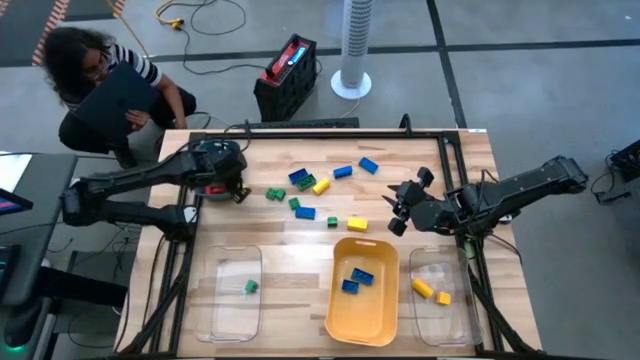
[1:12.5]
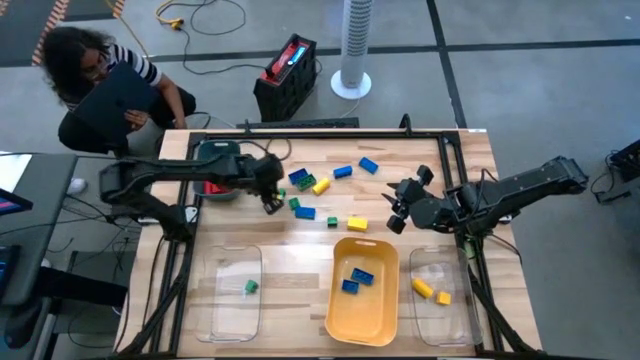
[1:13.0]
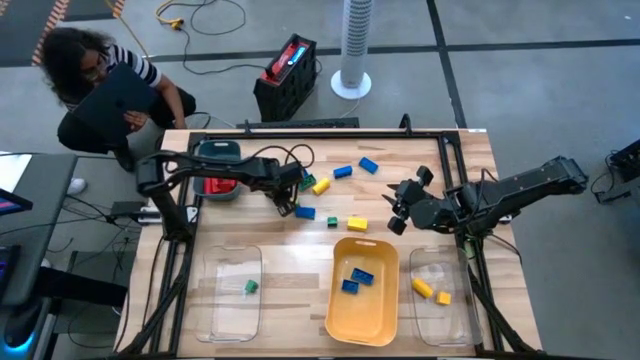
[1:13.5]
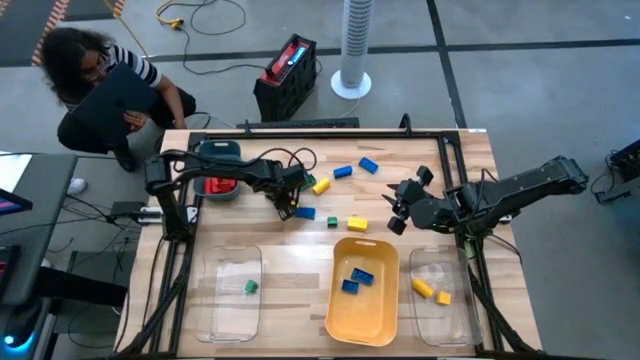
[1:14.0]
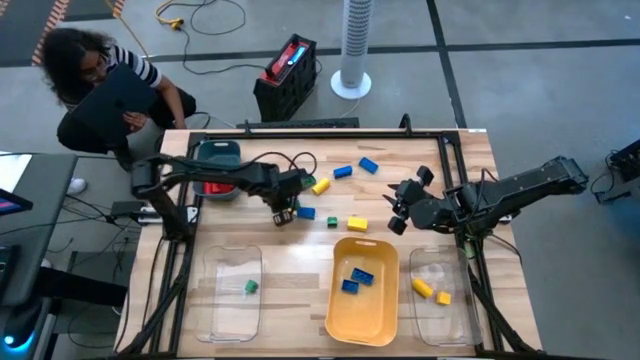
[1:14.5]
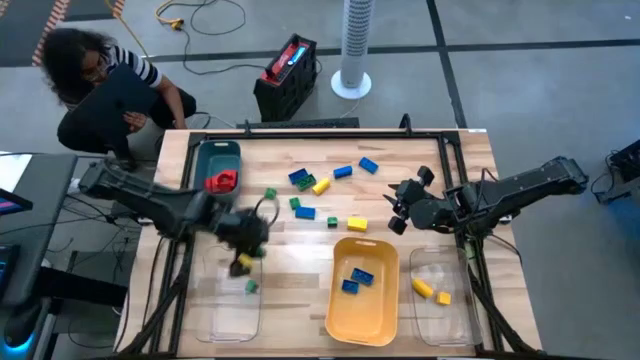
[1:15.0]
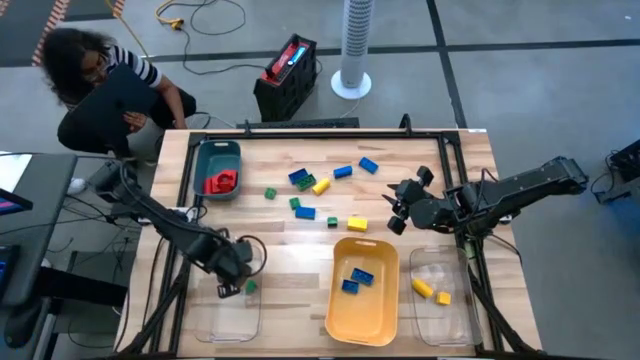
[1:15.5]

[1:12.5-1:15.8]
Task: Sort blocks
Put the green game piece into the left transparent bin

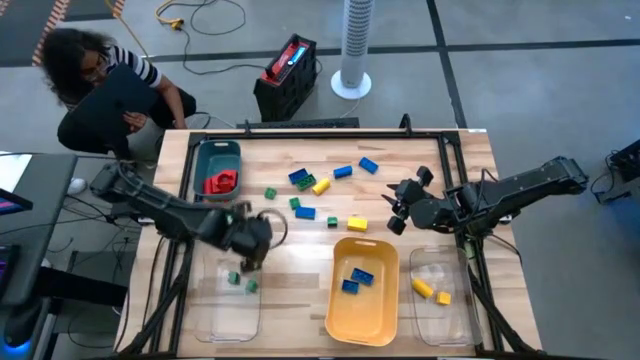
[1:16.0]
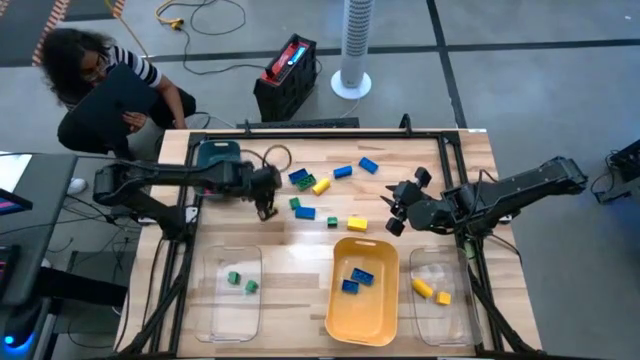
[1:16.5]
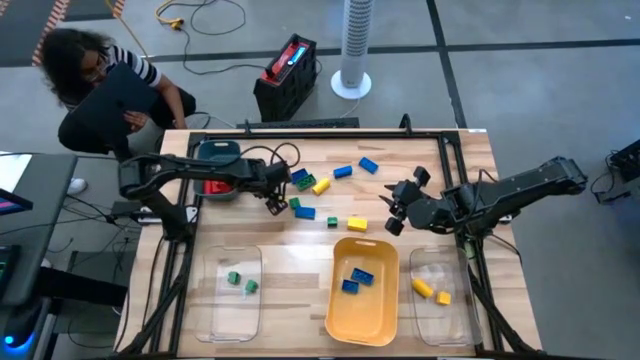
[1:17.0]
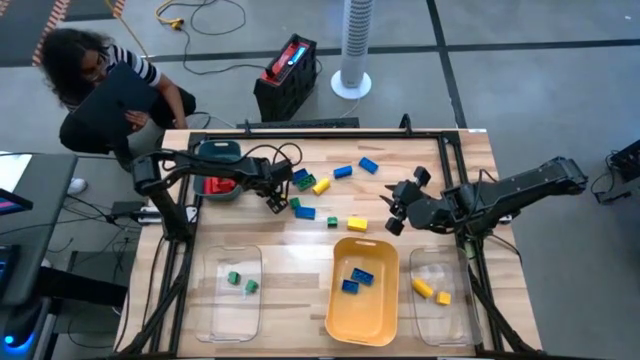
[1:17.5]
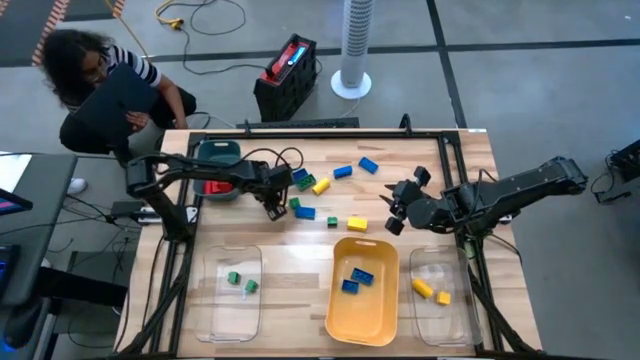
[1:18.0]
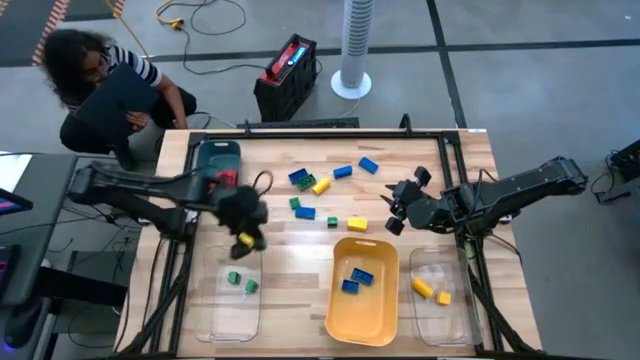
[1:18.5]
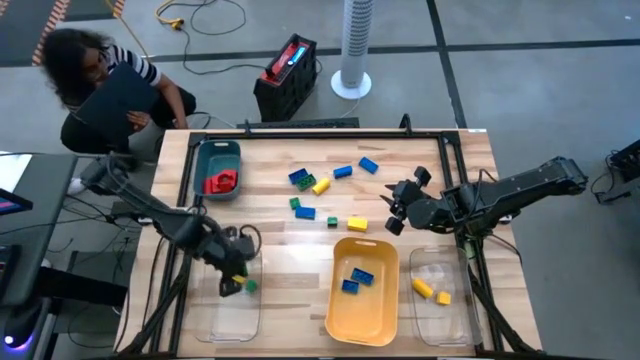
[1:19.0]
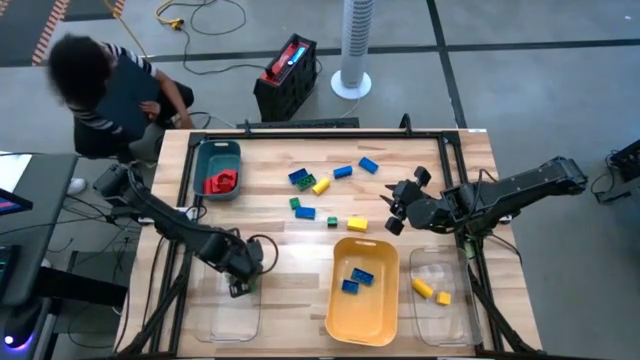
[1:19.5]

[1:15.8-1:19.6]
Put the green game piece into the left transparent bin

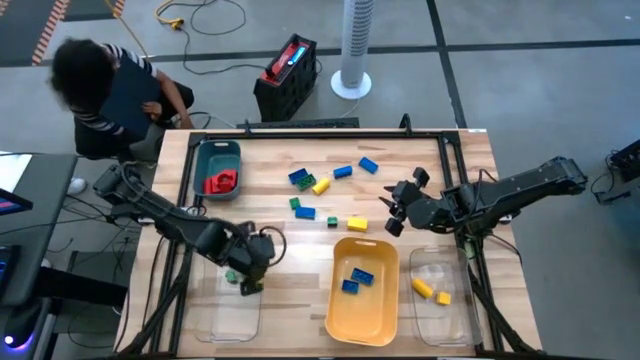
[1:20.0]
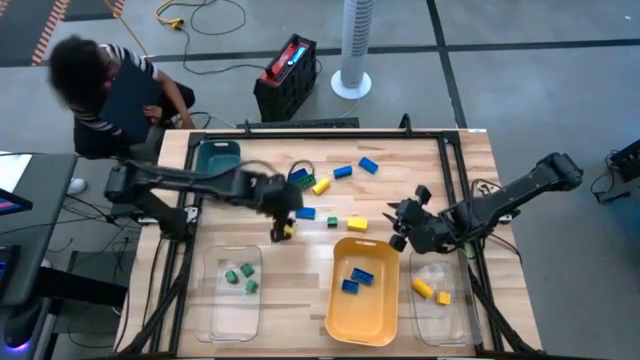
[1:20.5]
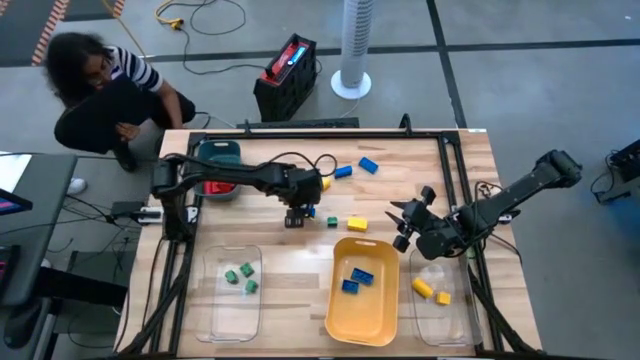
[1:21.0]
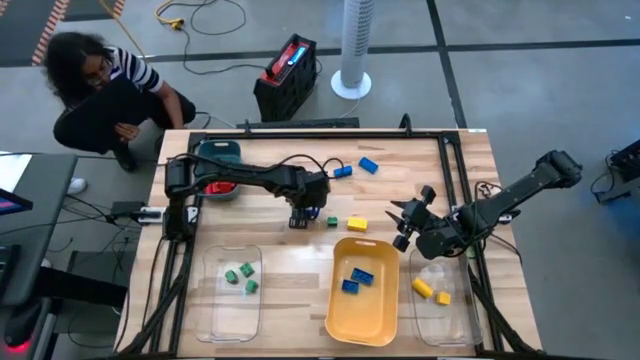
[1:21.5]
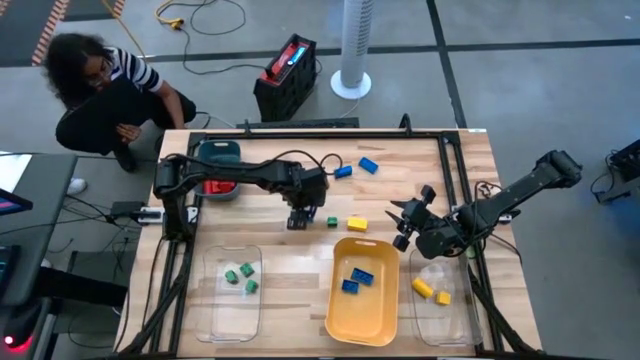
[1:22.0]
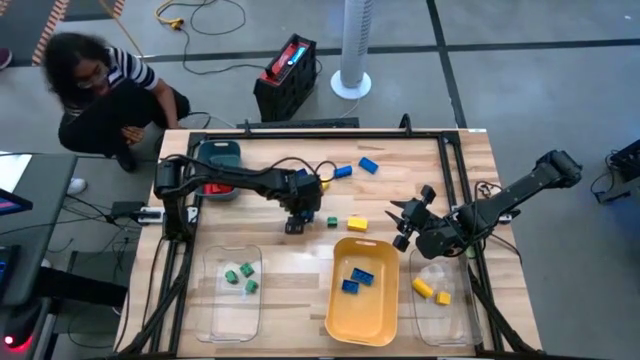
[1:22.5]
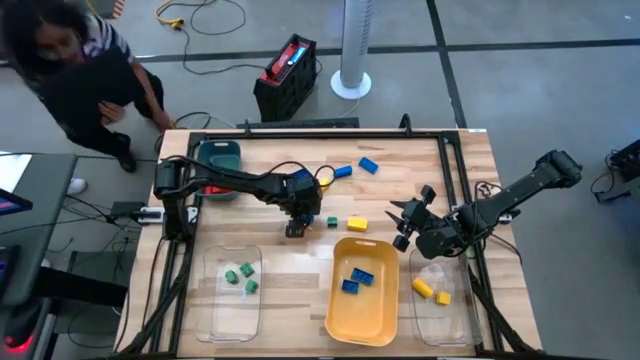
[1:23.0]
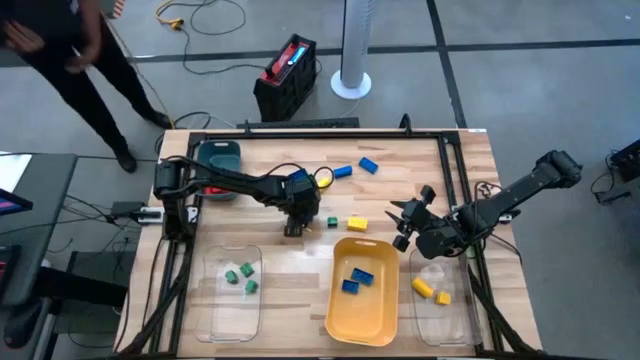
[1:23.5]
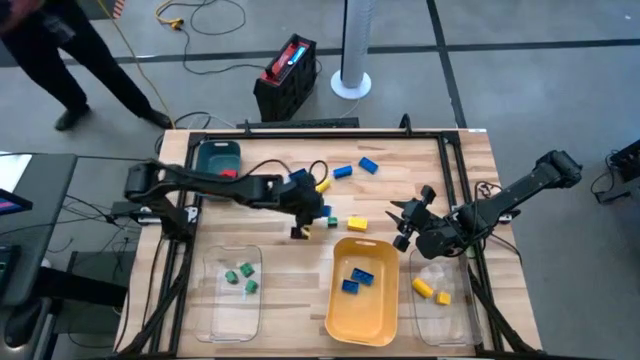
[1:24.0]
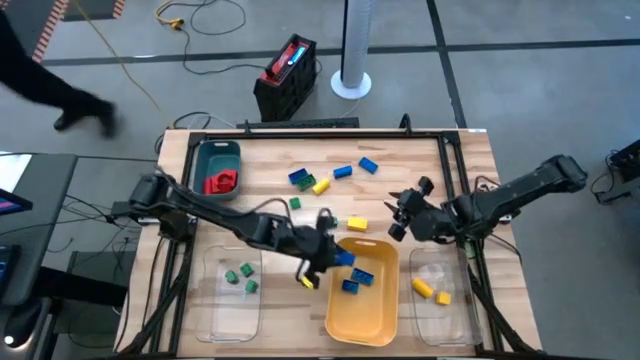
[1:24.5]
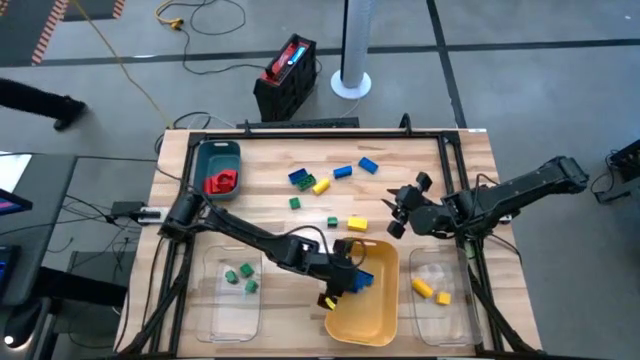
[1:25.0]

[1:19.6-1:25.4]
Put the blue game piece into the yellow bin

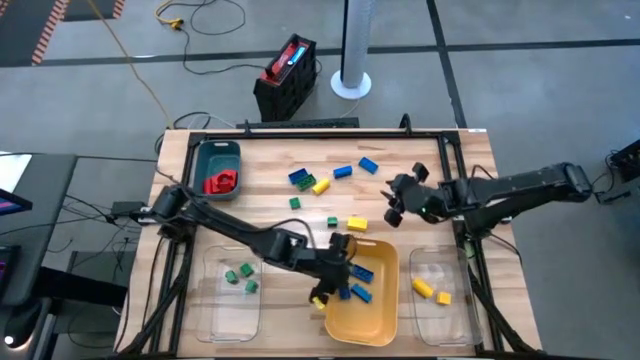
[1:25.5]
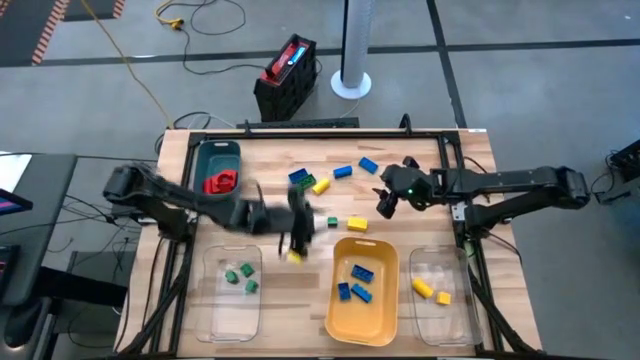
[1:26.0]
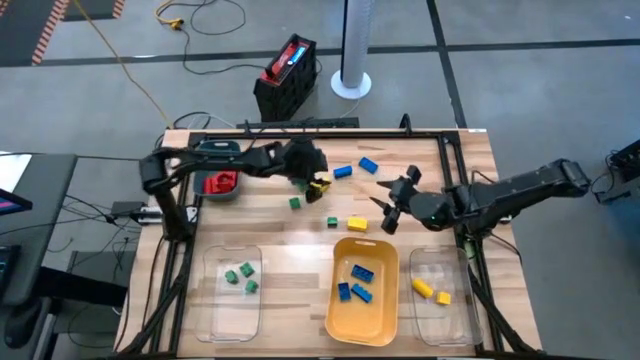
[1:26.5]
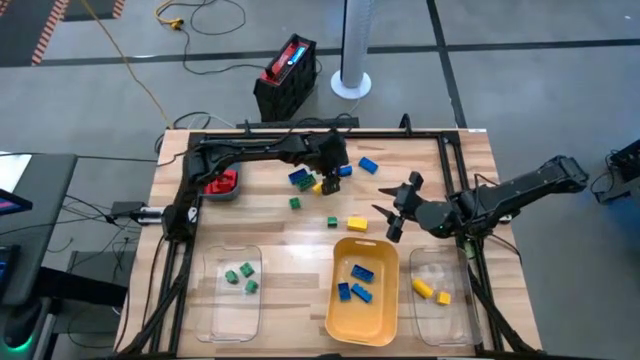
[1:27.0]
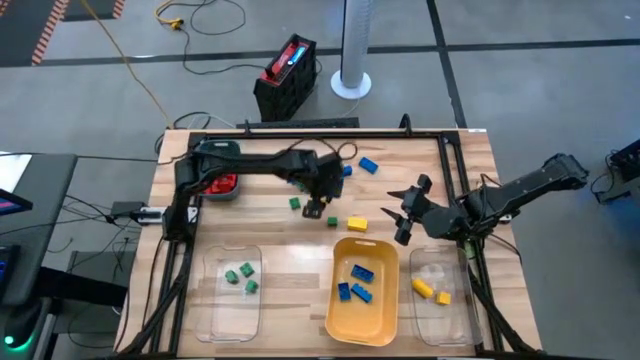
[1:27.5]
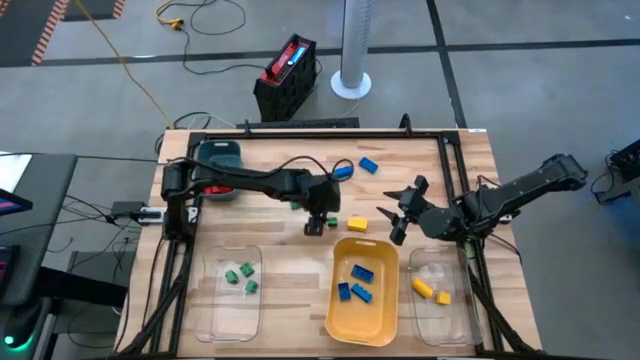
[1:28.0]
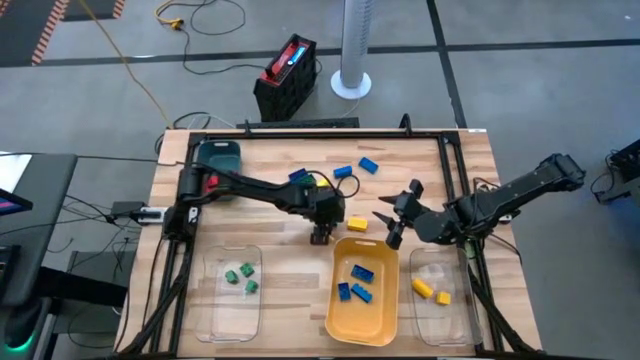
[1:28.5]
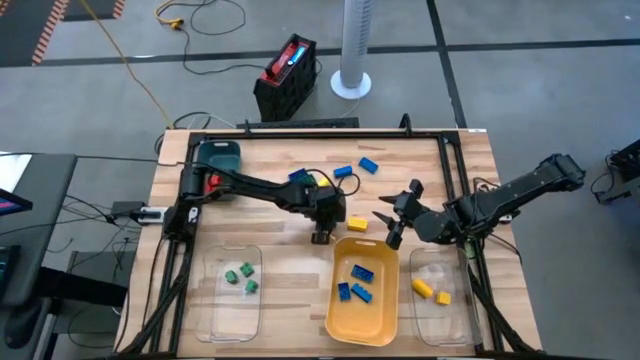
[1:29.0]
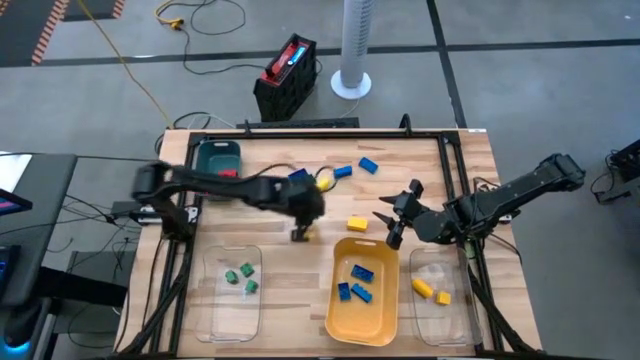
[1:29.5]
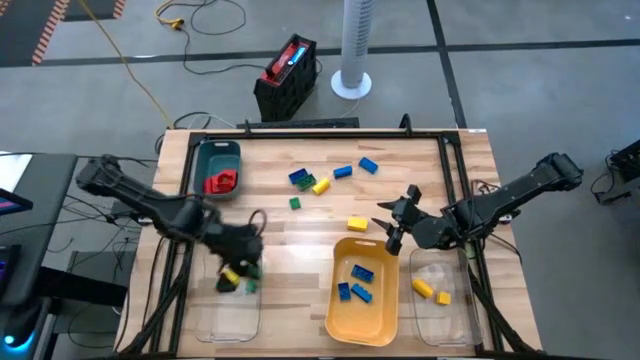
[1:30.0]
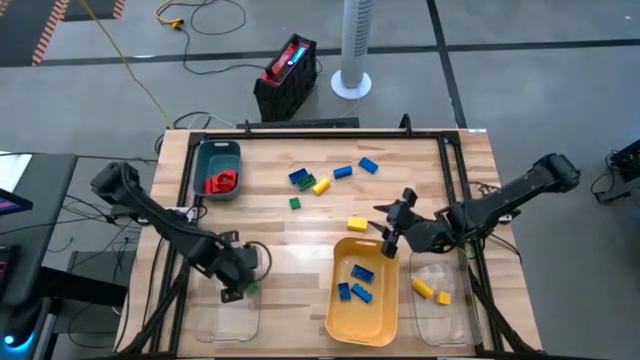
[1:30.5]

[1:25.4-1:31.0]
Put the green game piece into the left transparent bin

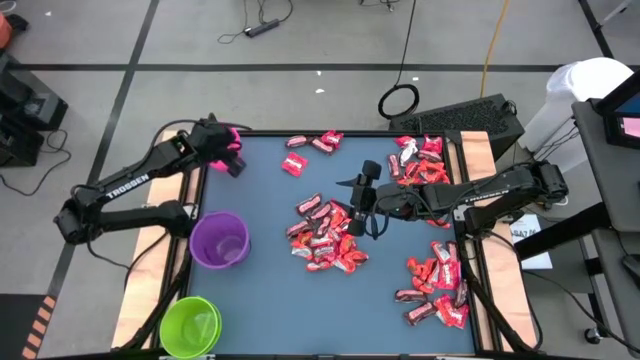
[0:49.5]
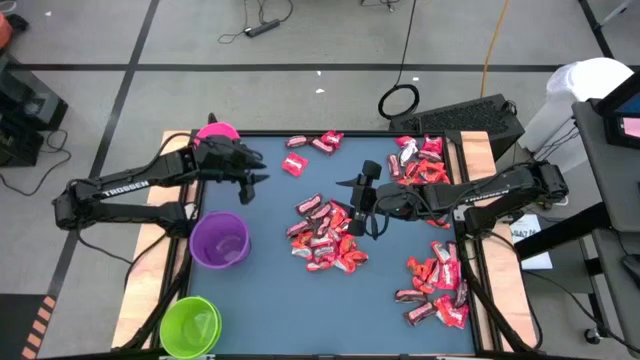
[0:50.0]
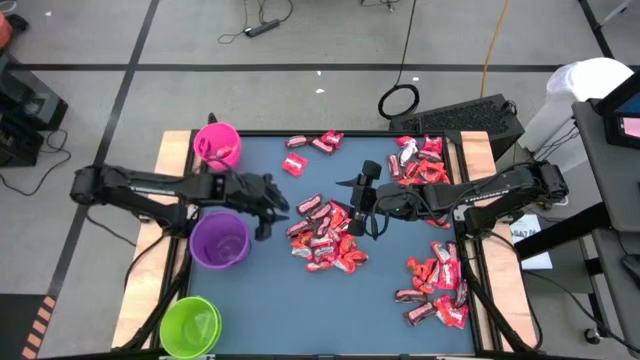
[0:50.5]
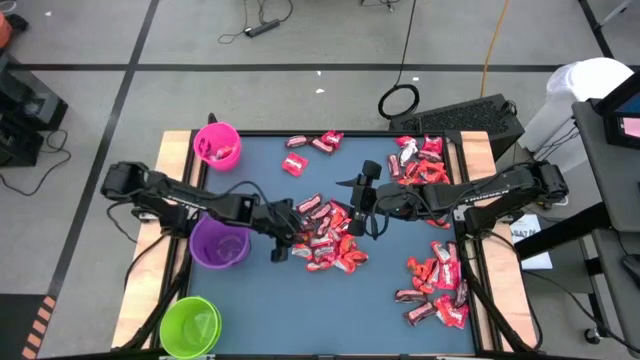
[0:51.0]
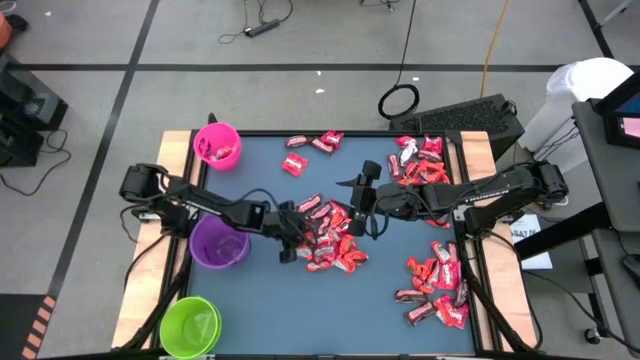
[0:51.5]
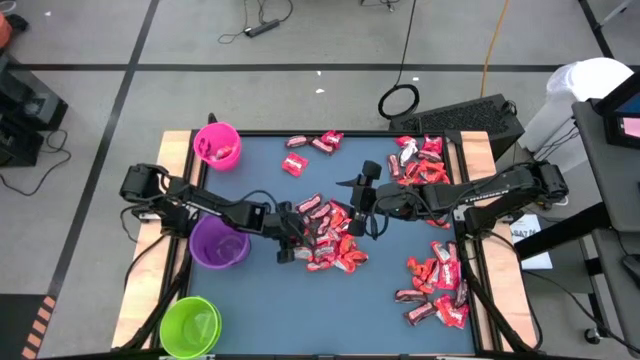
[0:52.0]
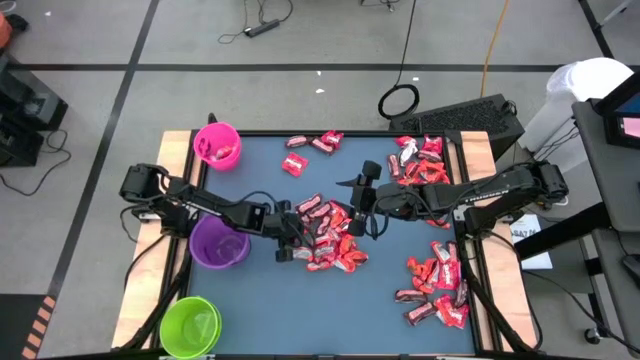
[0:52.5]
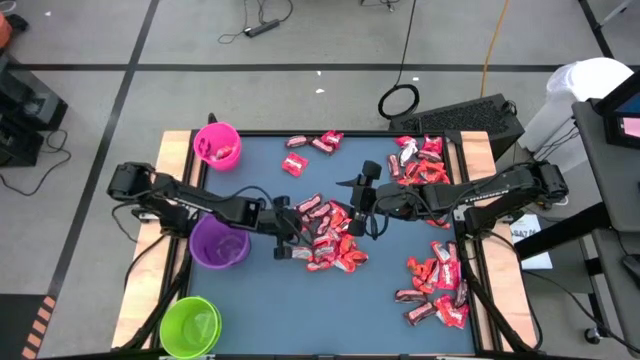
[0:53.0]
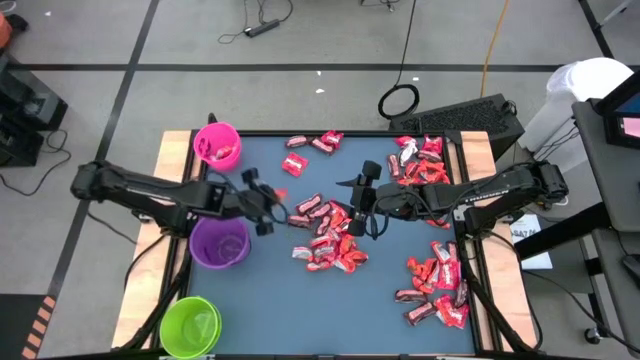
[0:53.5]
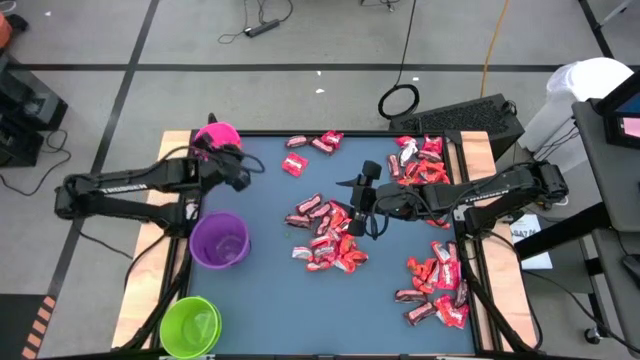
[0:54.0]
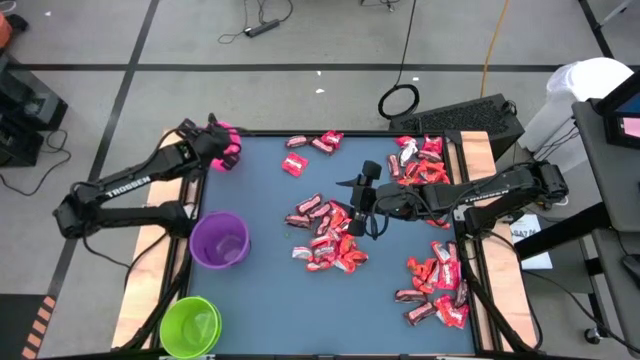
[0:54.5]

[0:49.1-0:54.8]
Task: Organize candy in baskets
Put the orange chocolate into the pink bucket
